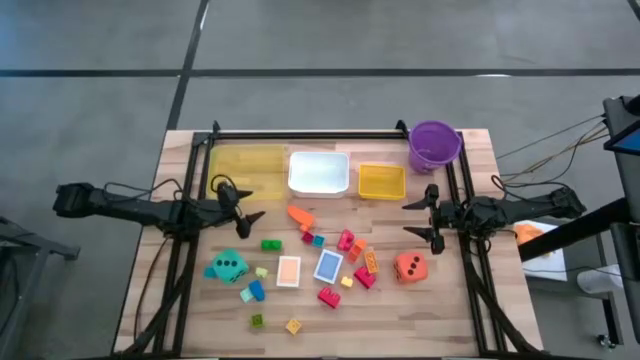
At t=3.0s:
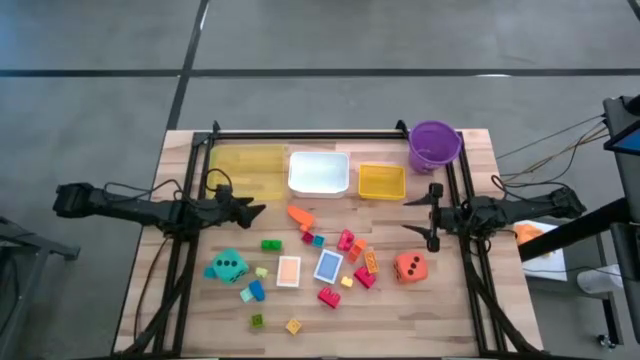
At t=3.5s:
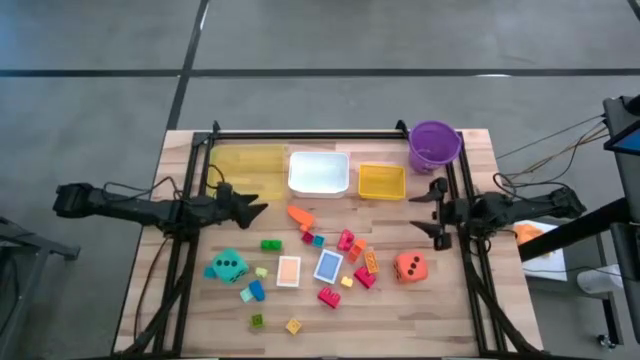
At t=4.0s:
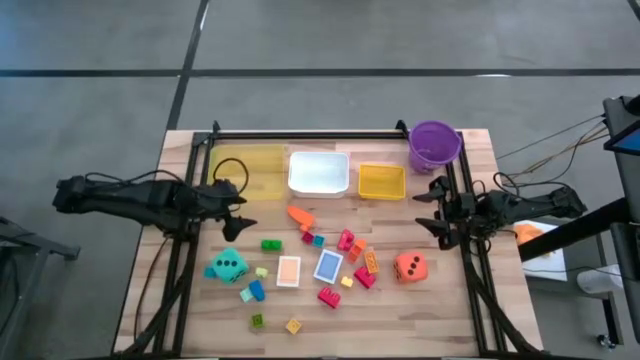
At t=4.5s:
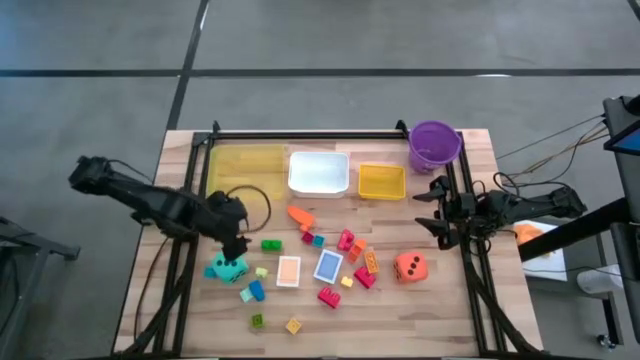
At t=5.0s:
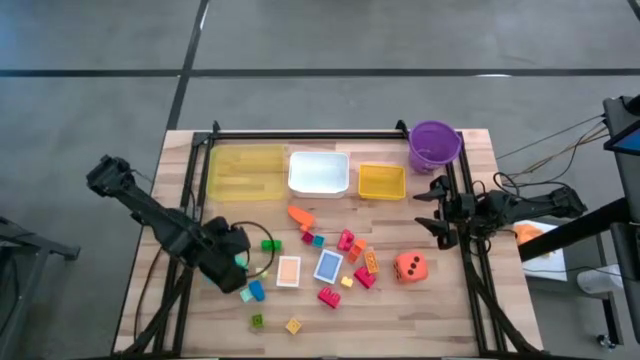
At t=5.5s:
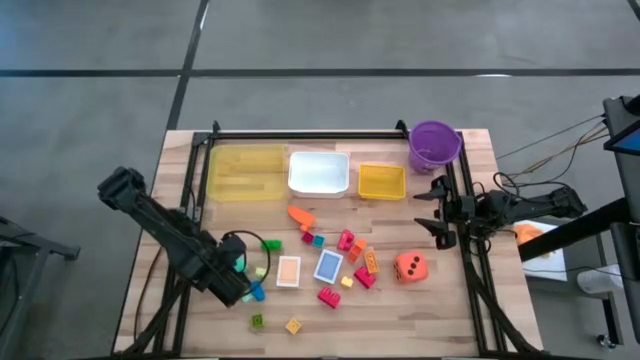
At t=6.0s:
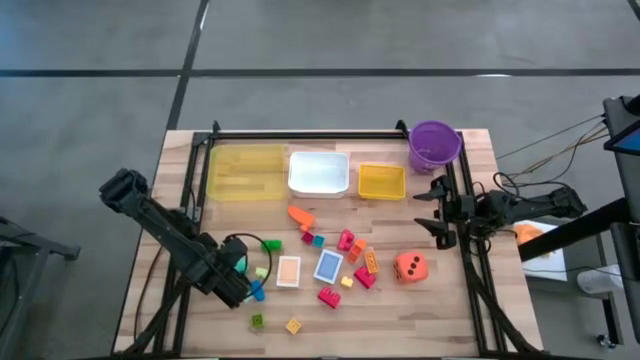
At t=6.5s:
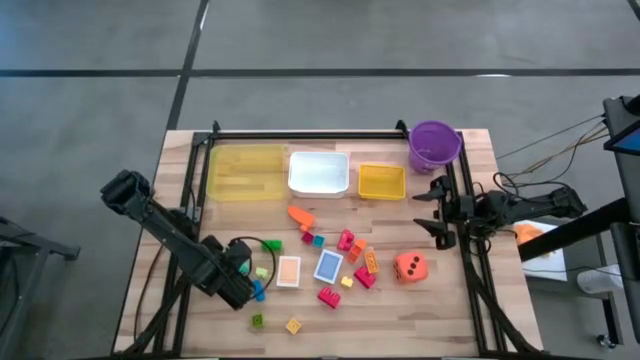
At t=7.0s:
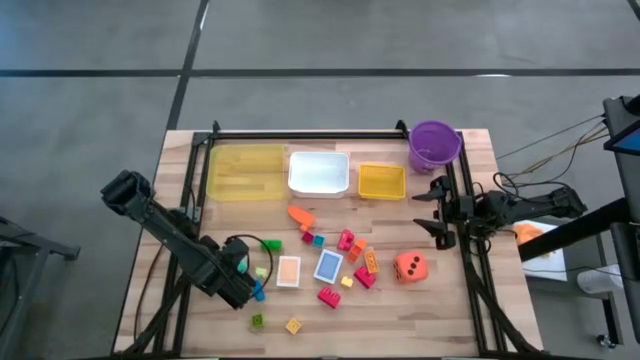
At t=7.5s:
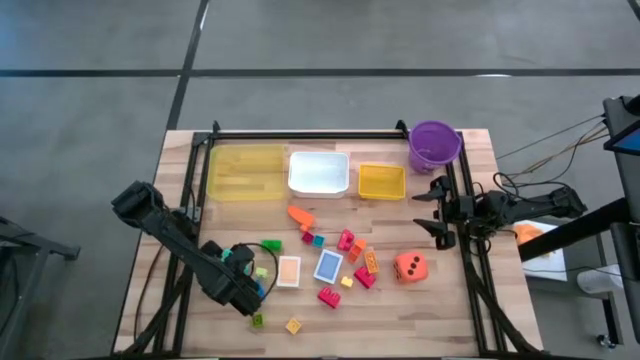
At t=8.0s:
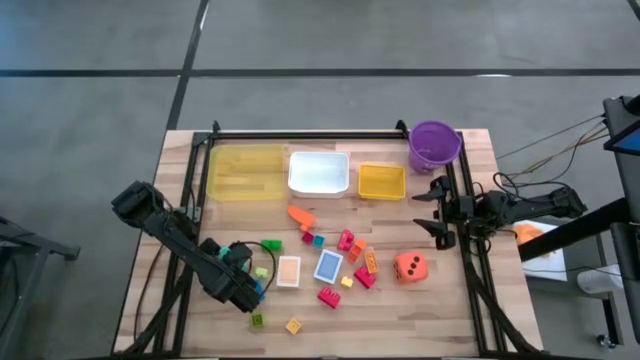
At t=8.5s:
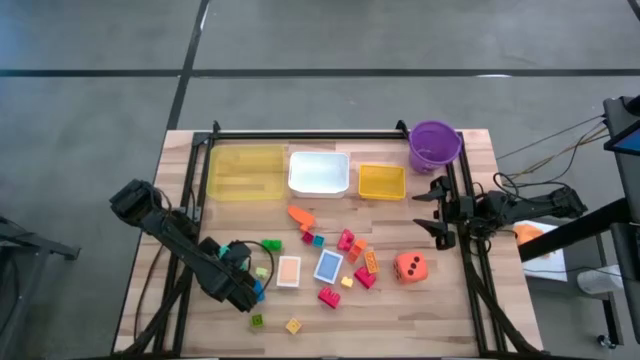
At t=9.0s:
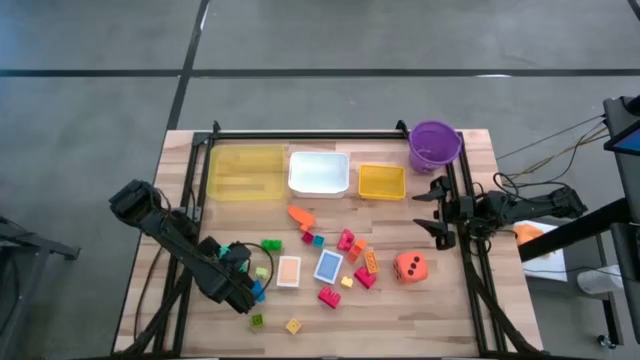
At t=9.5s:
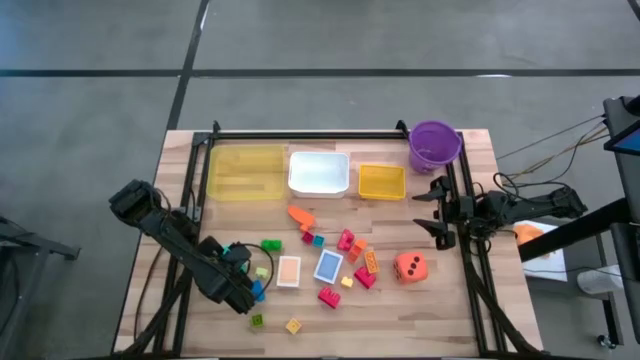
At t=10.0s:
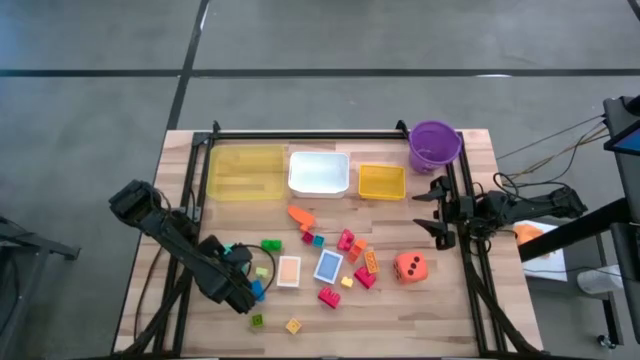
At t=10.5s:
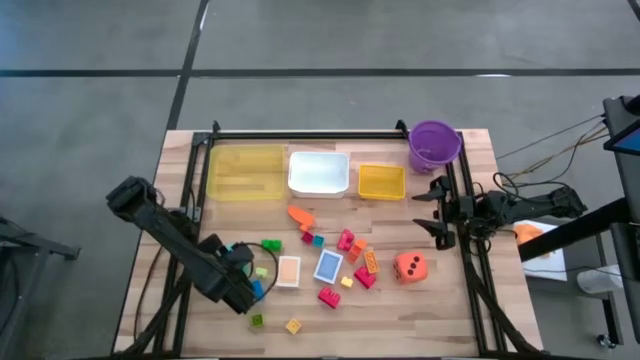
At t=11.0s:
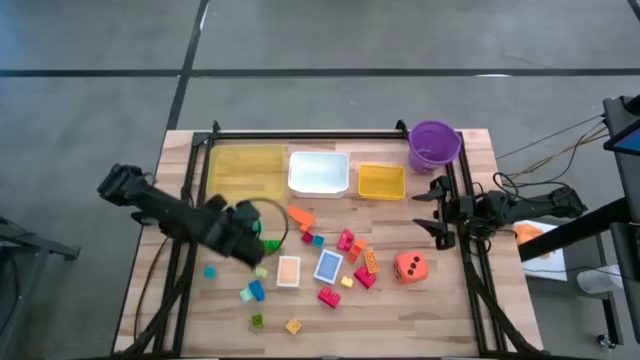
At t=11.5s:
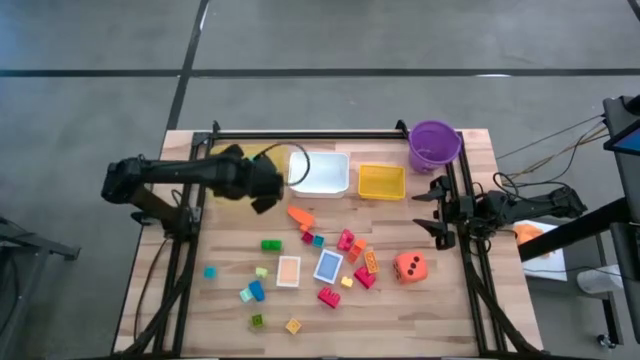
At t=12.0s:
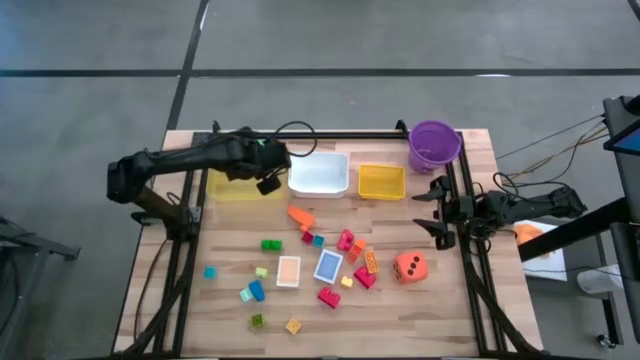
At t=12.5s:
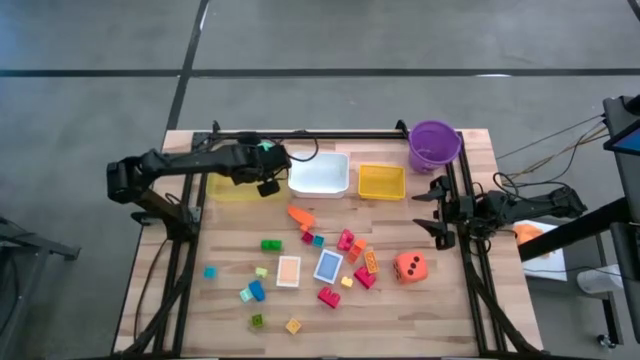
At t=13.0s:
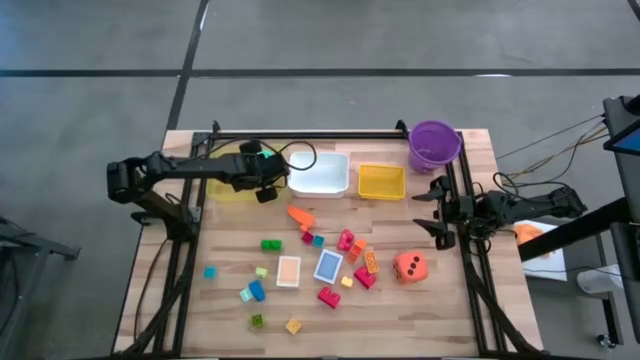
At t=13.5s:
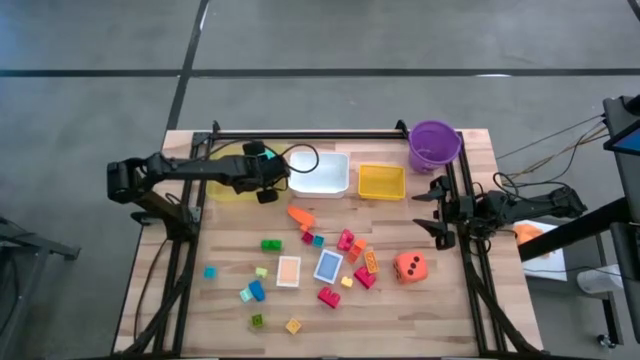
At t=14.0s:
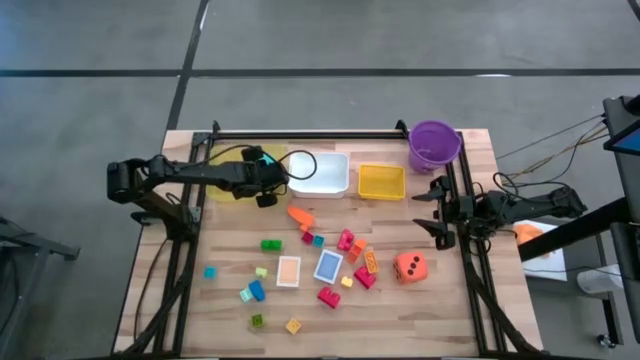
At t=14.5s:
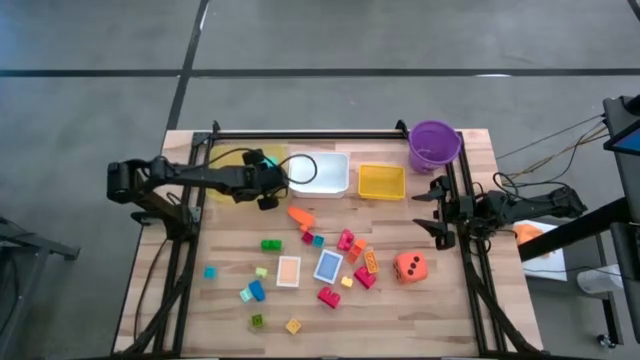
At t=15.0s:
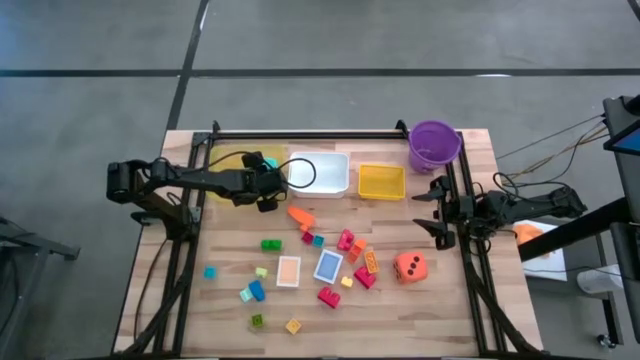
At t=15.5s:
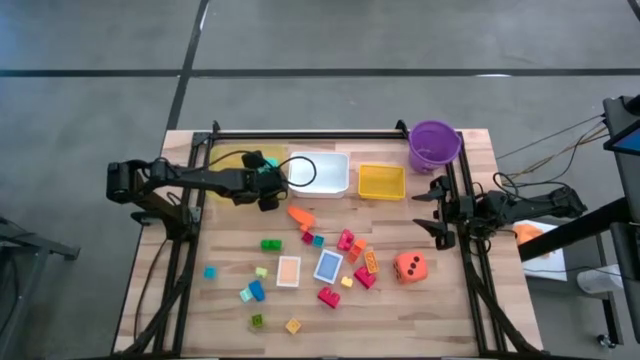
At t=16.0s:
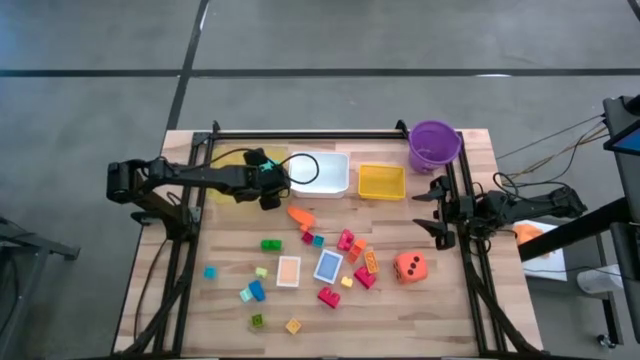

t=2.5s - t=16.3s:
Task: Pick & Place Toys
Put the blue dice into the yellow transparent bin

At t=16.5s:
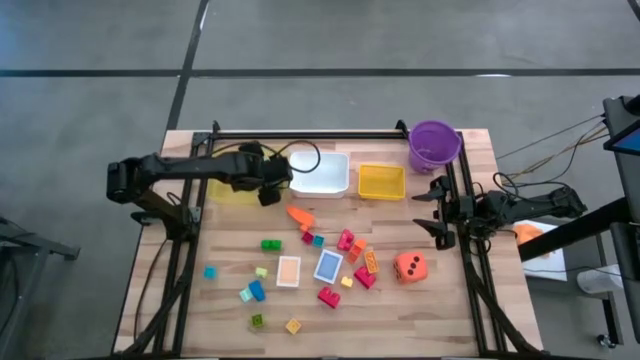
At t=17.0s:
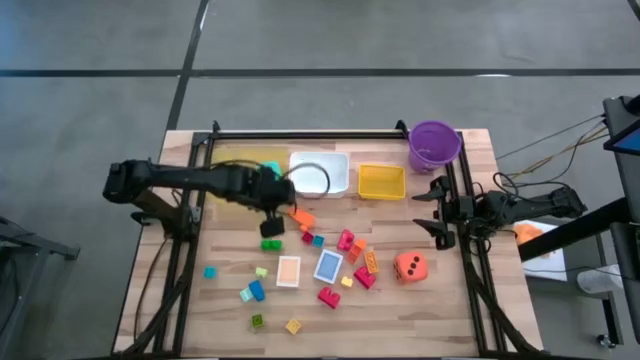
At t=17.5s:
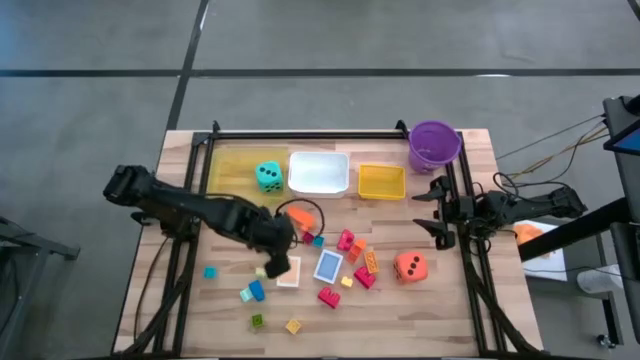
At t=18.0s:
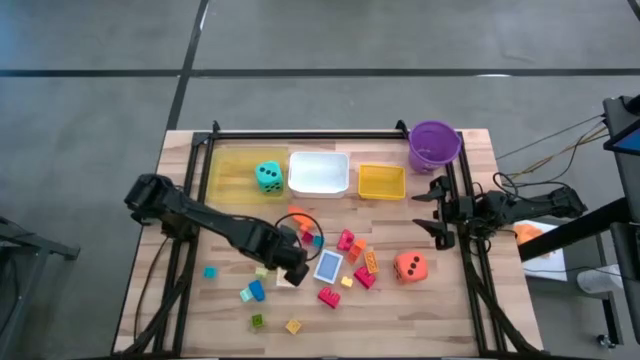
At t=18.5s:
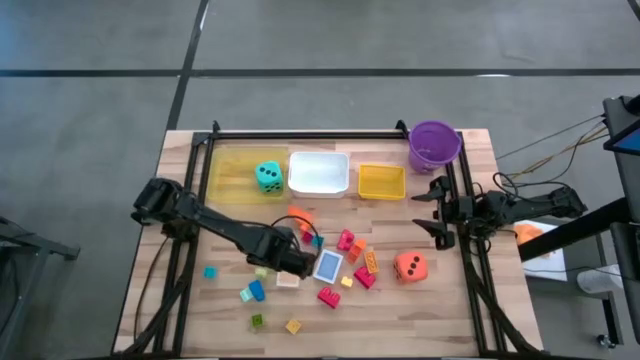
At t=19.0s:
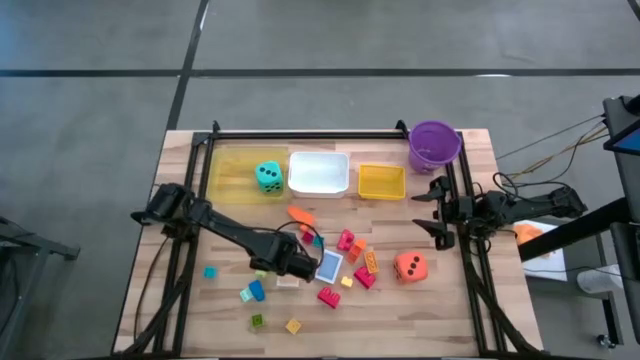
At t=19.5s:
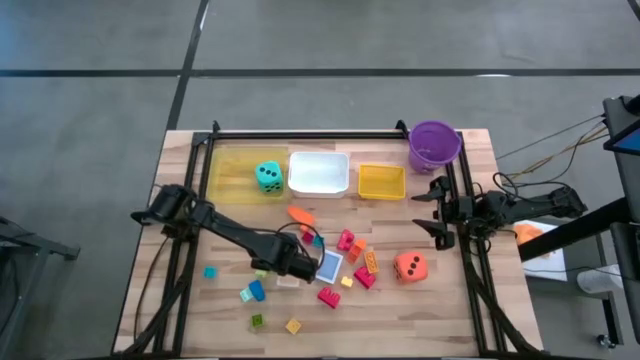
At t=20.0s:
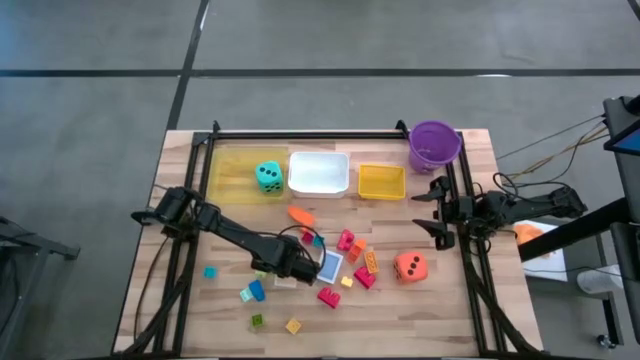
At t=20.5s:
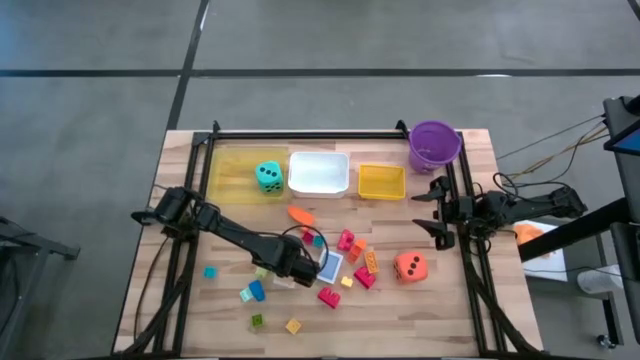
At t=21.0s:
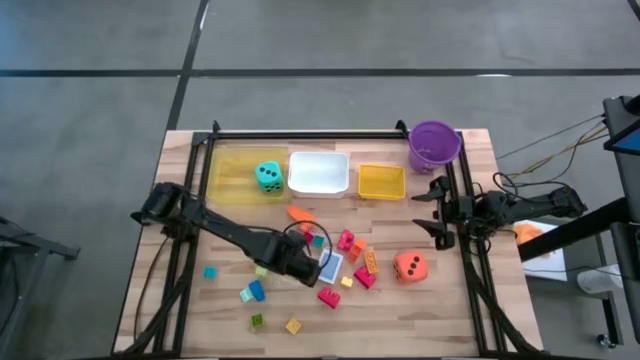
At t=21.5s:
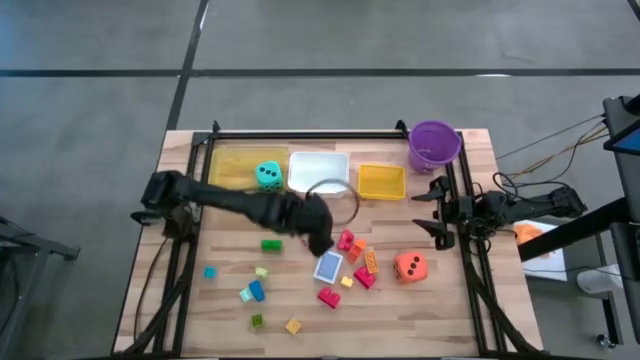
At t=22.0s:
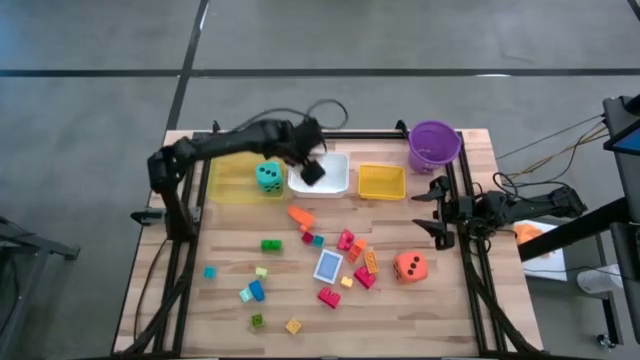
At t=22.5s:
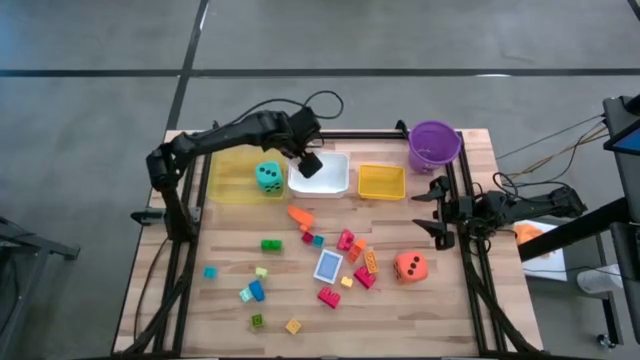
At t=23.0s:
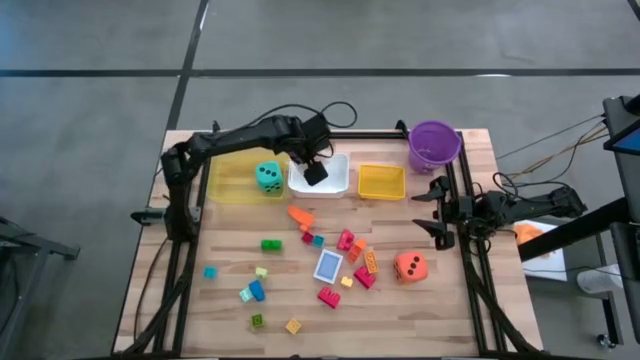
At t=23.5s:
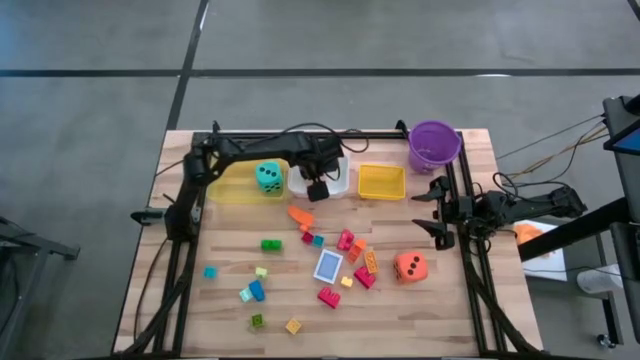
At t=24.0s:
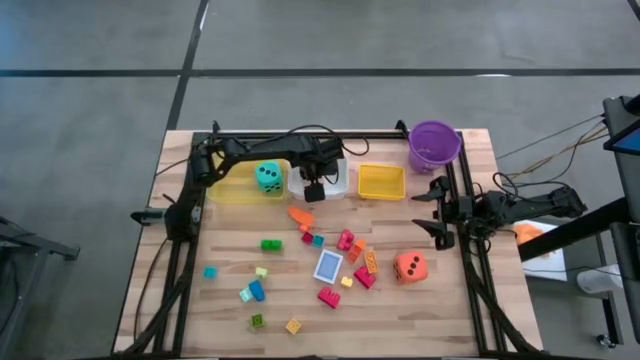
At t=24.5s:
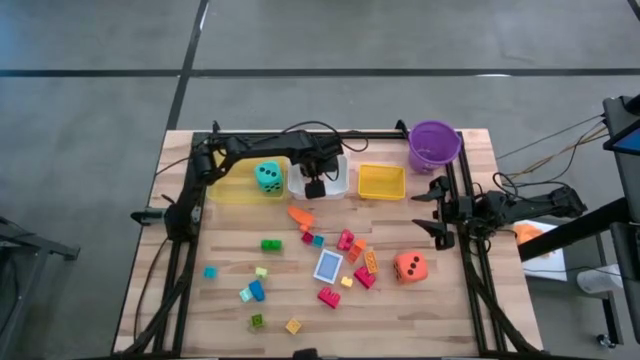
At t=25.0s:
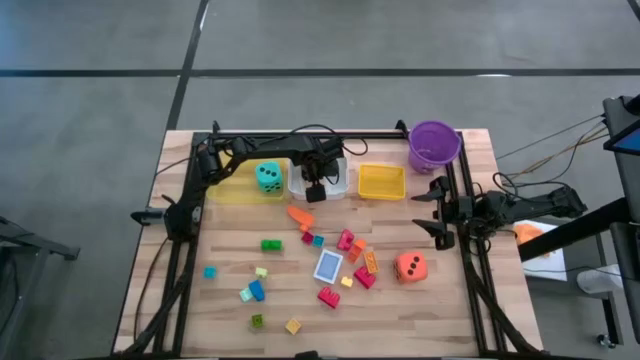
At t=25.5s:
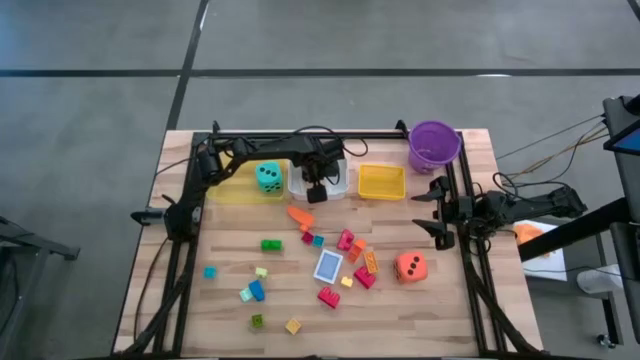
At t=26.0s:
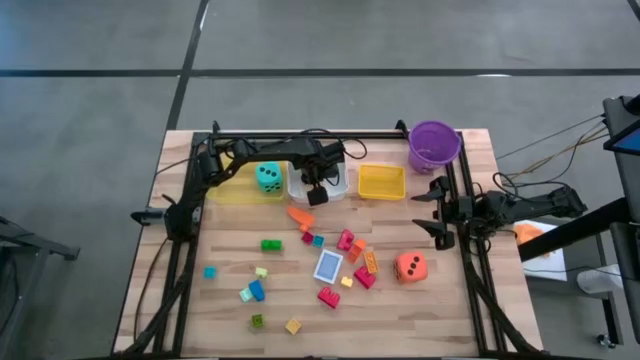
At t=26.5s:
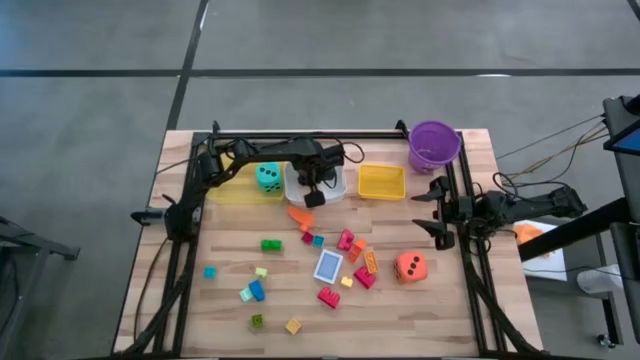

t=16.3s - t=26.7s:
Put the yellow playing cards box into the white bin
